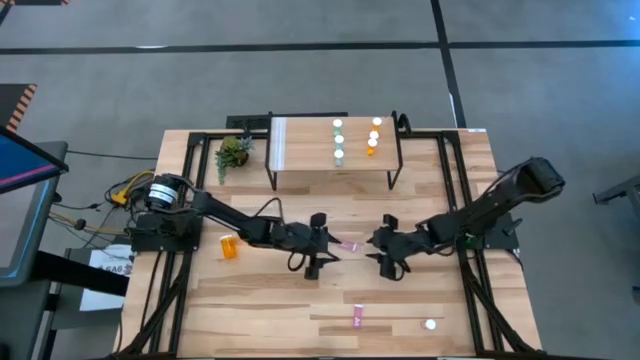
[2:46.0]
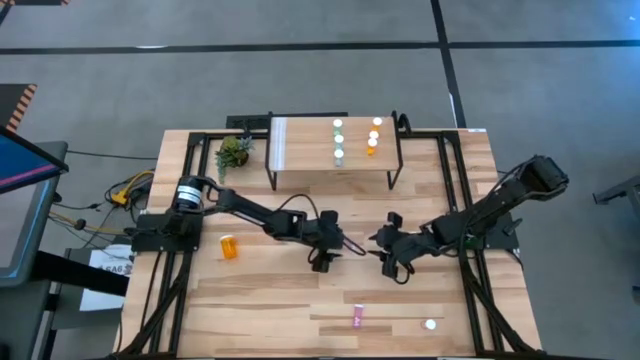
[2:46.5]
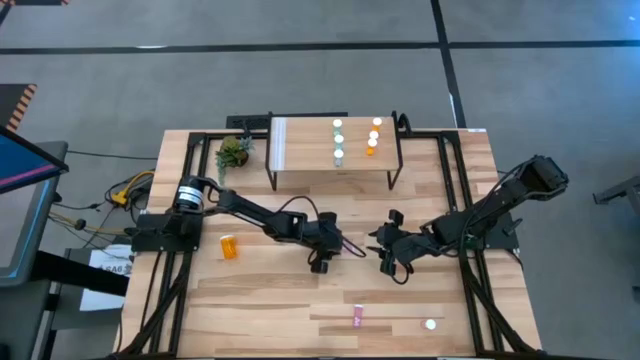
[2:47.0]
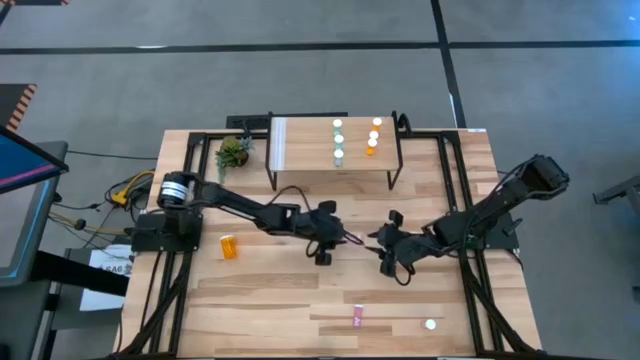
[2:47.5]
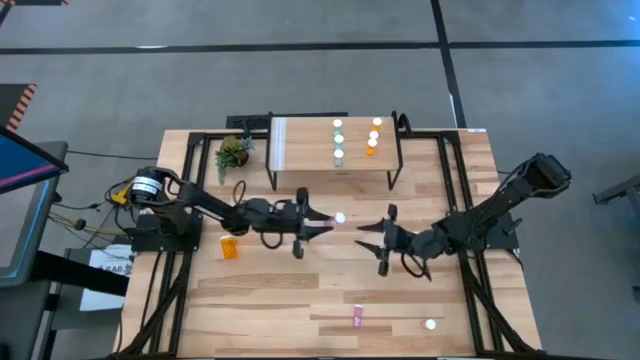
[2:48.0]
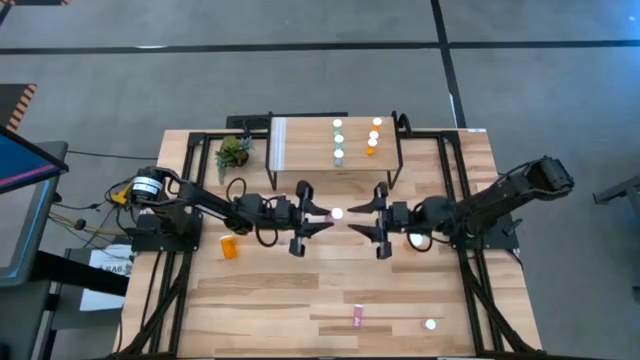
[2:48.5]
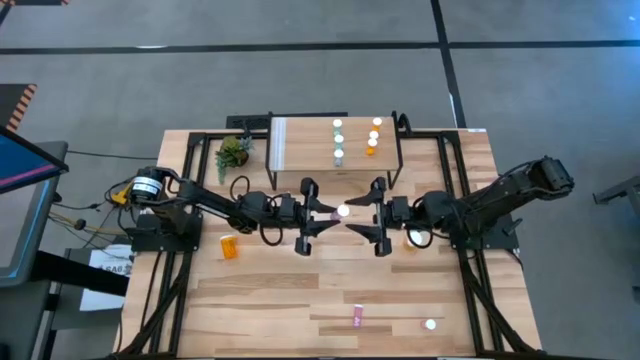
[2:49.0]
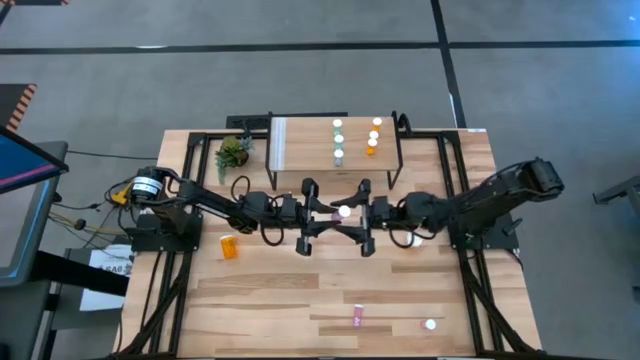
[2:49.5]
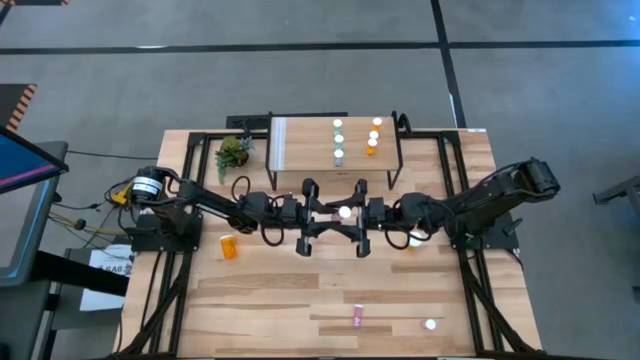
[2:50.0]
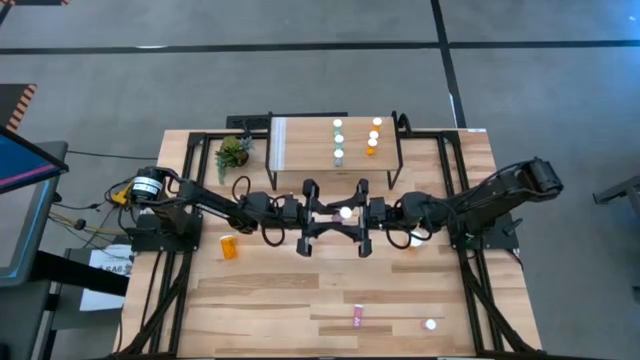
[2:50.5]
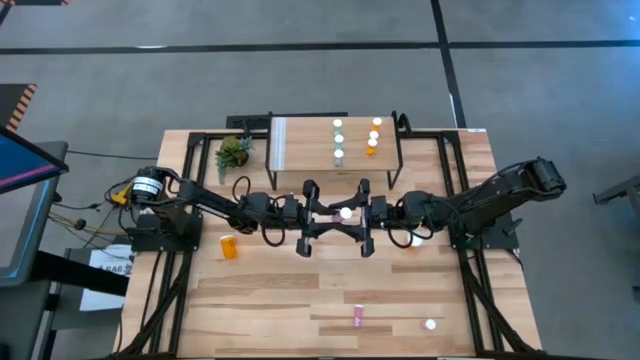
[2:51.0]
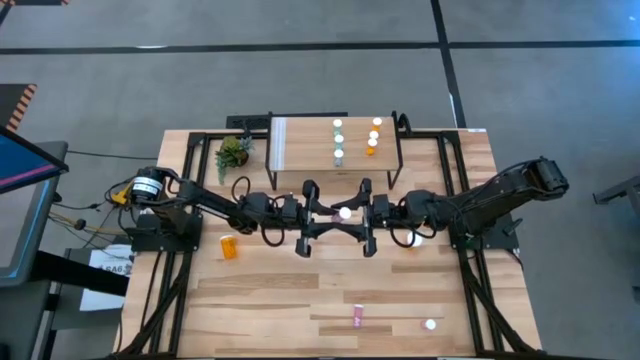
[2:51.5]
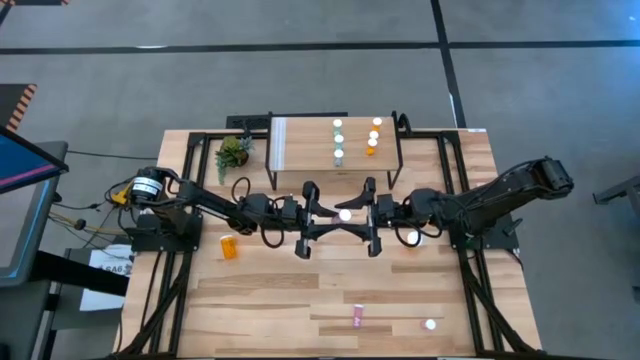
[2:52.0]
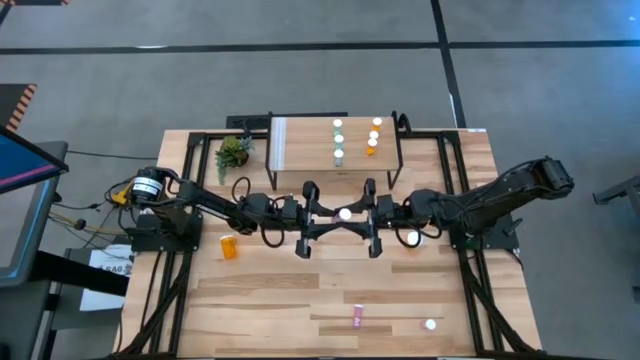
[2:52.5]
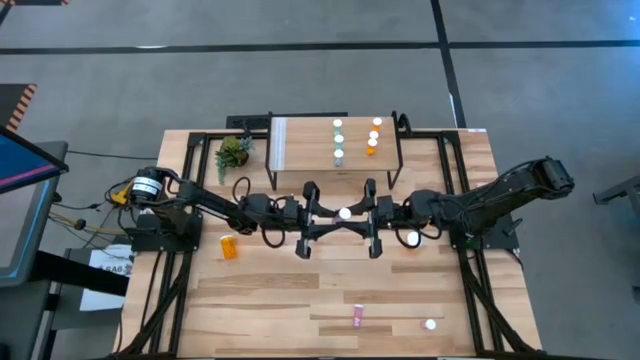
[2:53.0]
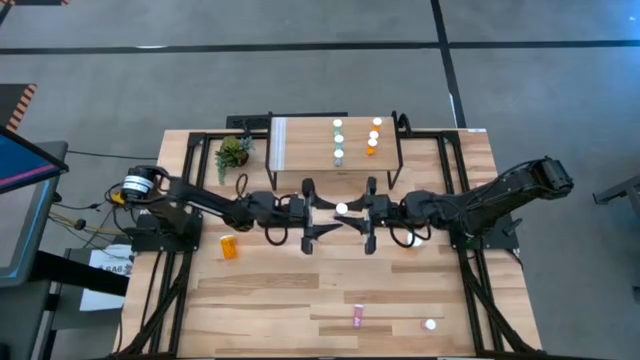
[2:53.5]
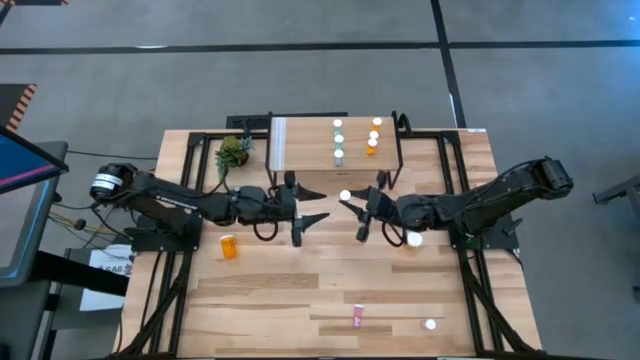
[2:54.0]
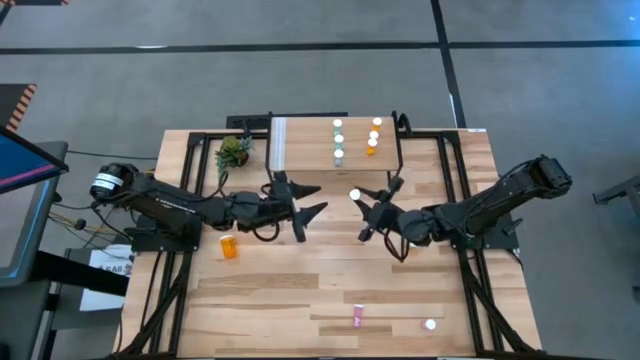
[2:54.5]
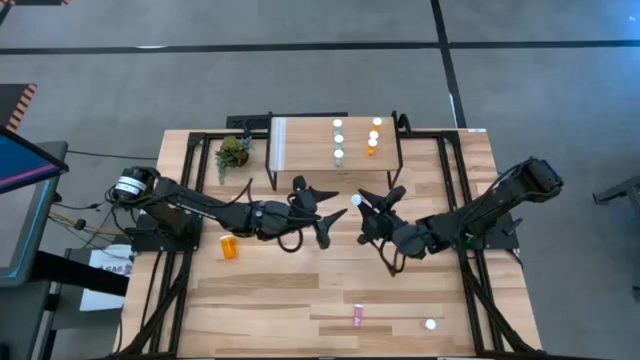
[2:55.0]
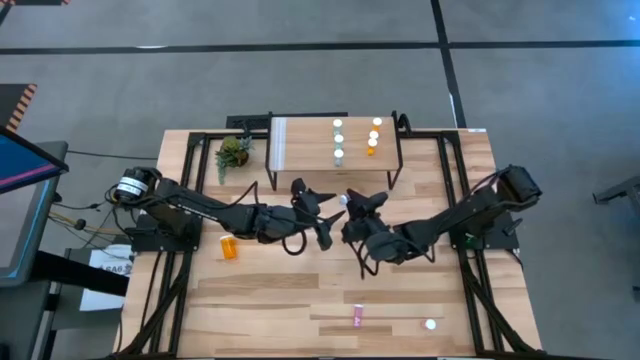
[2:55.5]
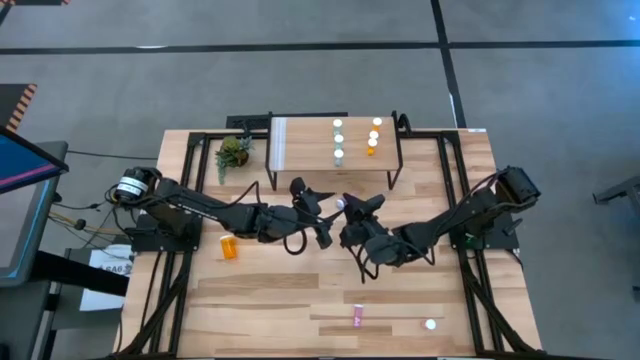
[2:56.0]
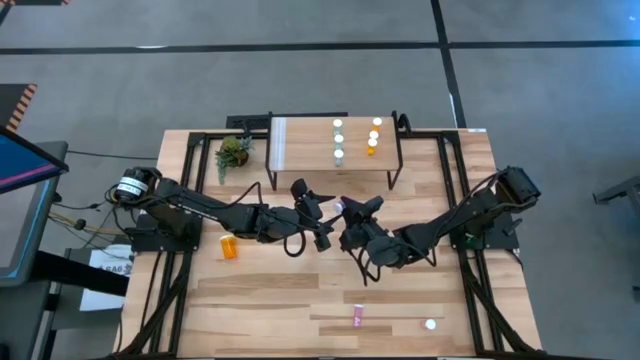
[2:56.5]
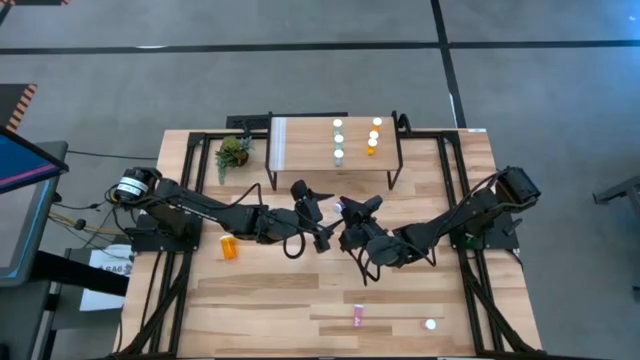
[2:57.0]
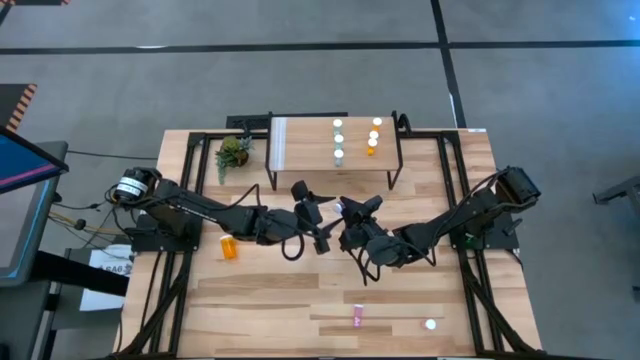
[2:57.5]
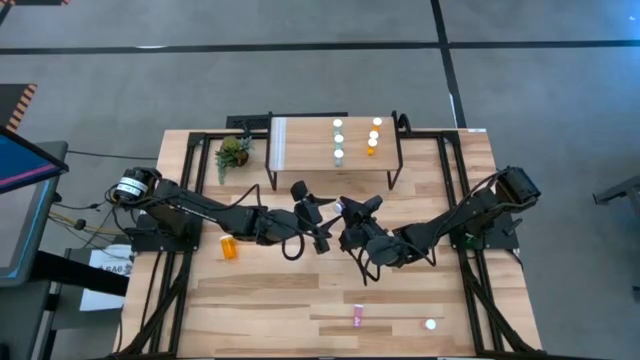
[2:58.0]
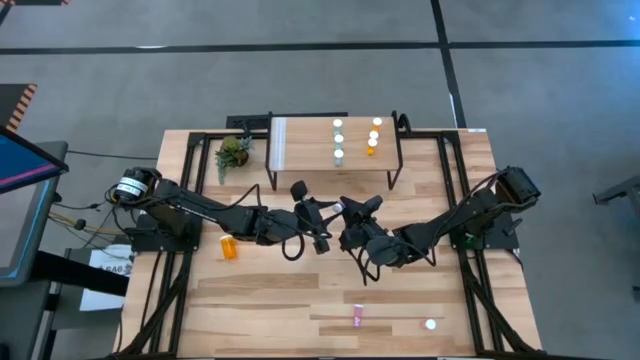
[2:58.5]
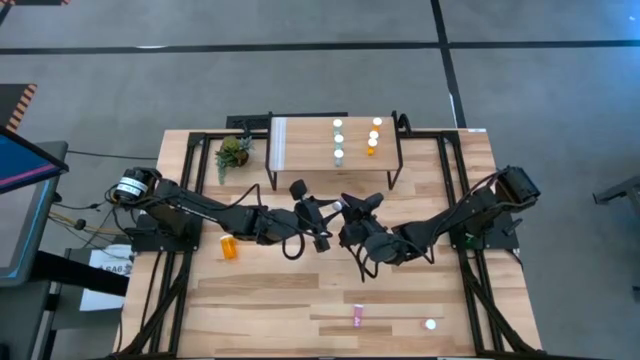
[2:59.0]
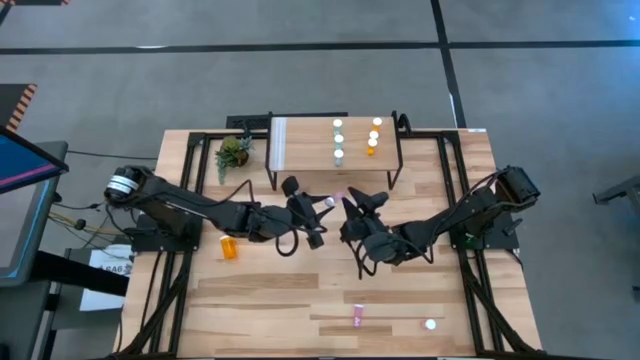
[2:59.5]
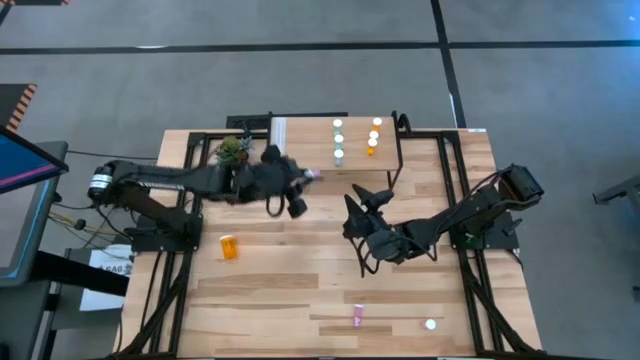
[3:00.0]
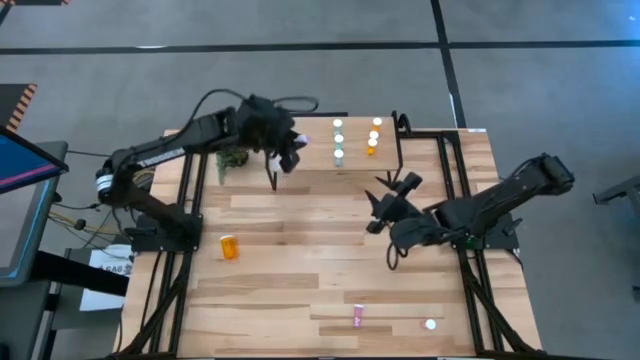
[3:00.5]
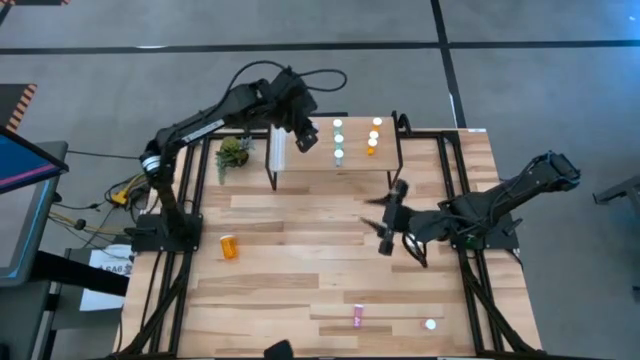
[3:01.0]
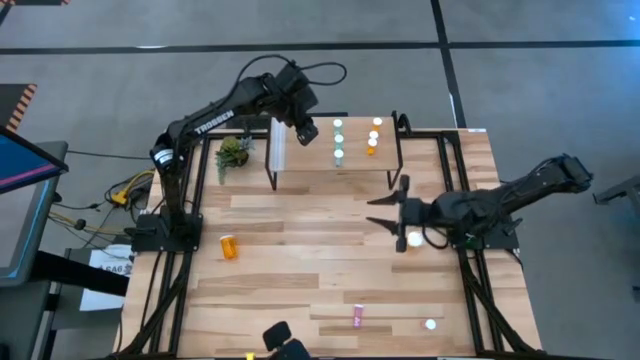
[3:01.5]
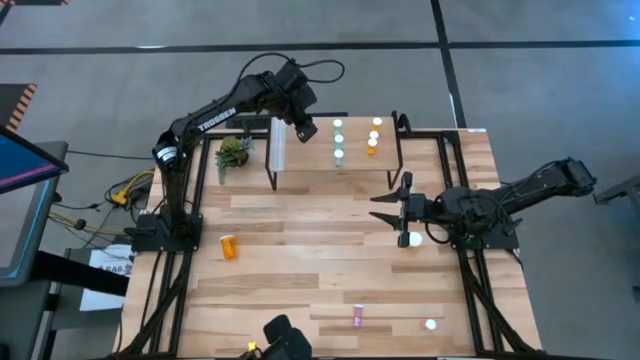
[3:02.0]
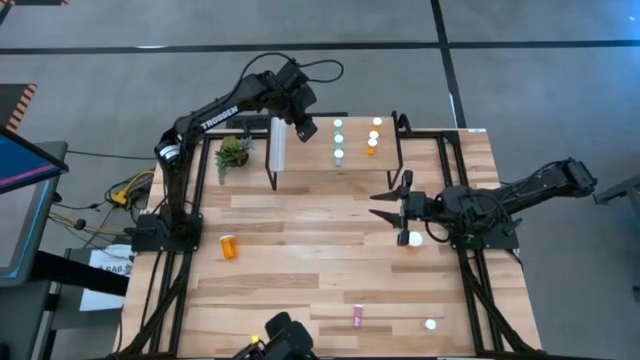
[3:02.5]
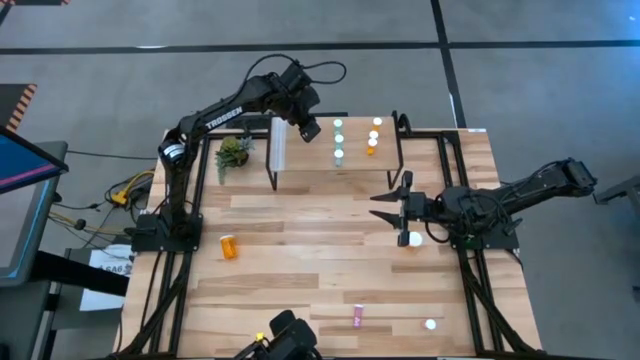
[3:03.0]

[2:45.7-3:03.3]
Task: Pick and place medicine bottles onto shelf by color
Put the top pink pill bottle on the shelf

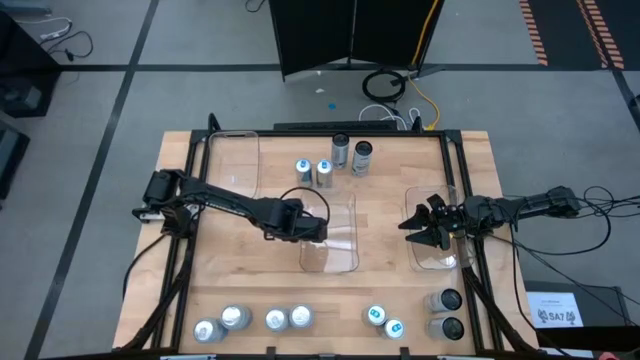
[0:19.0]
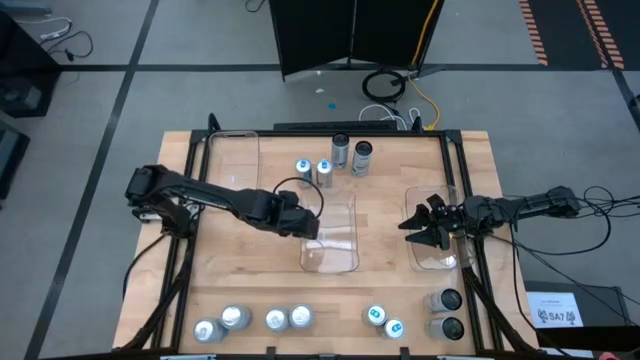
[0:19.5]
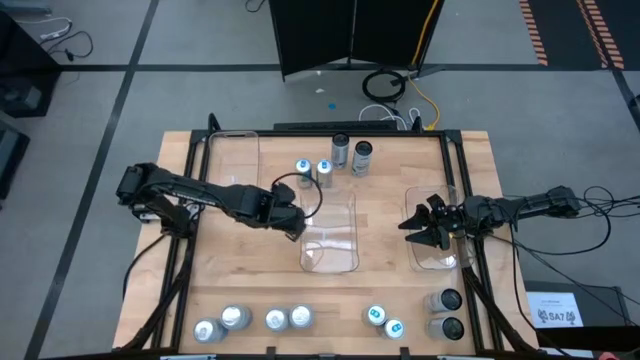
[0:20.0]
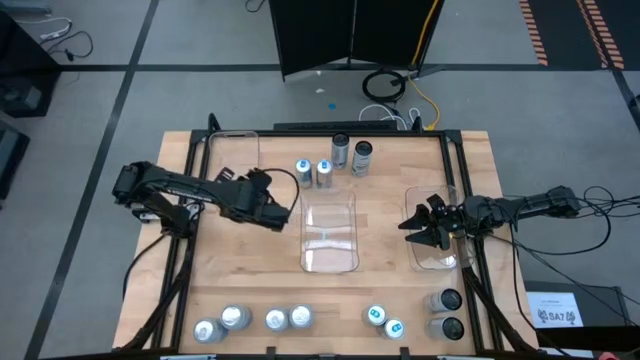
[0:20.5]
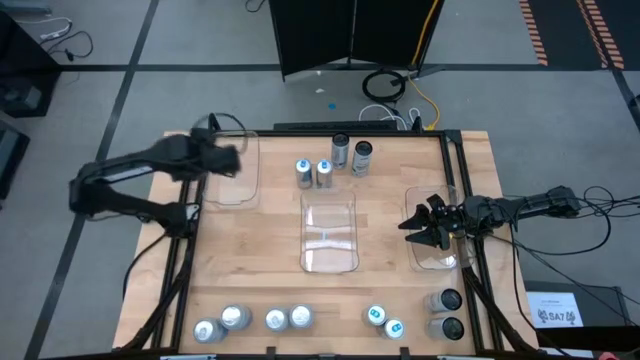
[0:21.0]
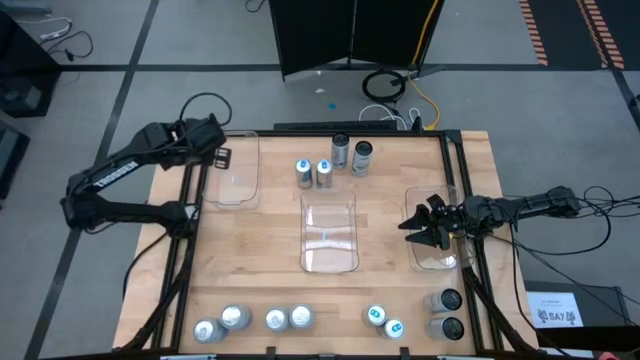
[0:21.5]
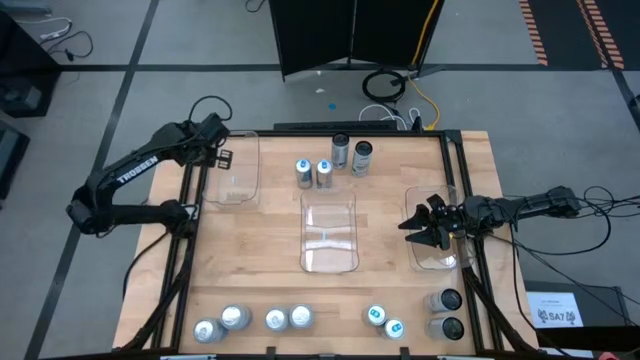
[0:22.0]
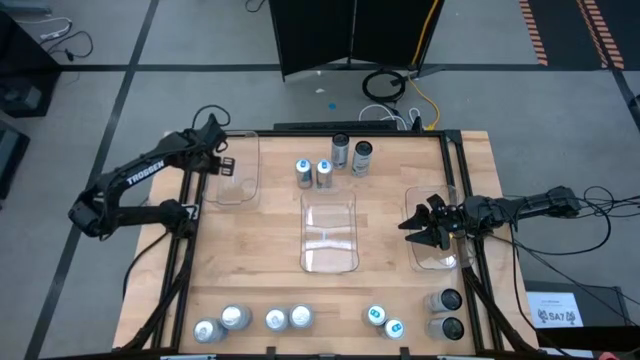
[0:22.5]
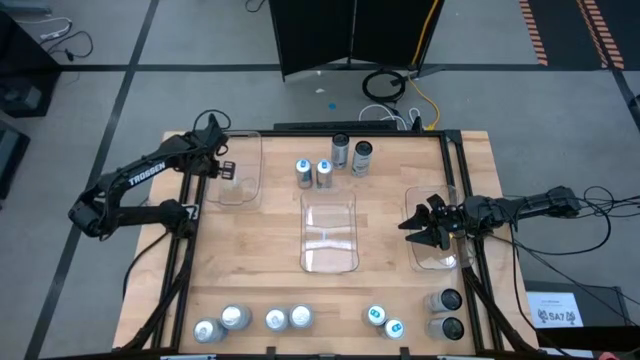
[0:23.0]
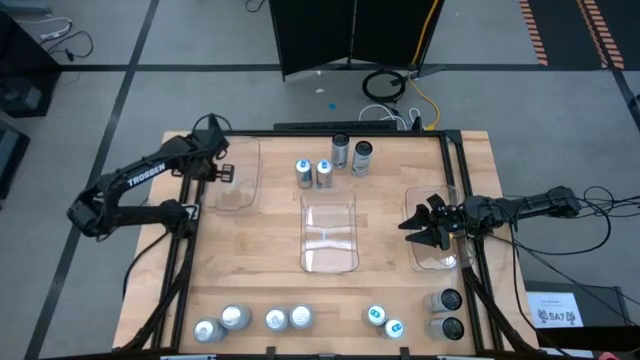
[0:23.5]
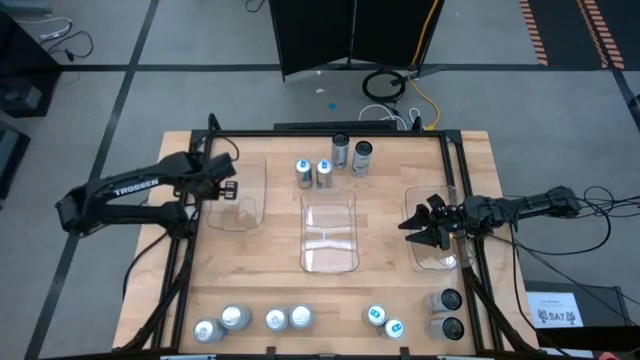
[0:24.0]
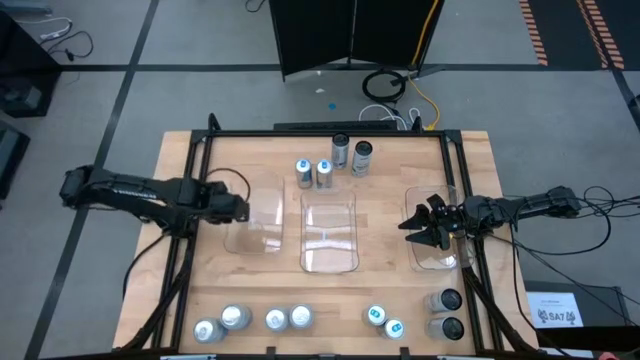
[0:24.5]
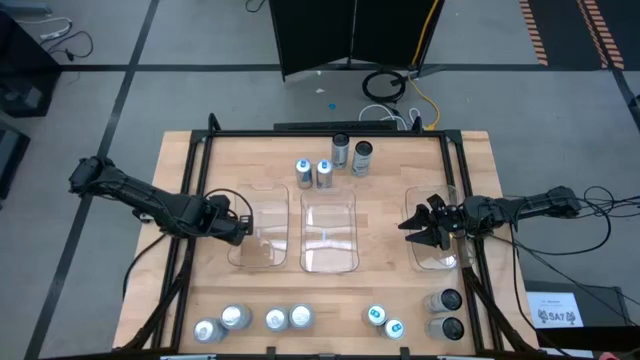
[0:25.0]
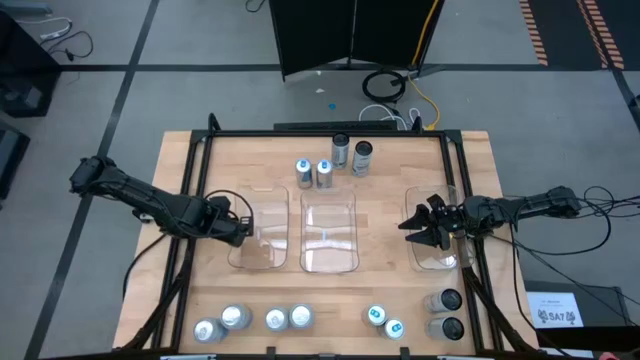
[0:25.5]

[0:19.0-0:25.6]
Task: Sort soda cans
Move the top left transparent bin to the middle left of the table
